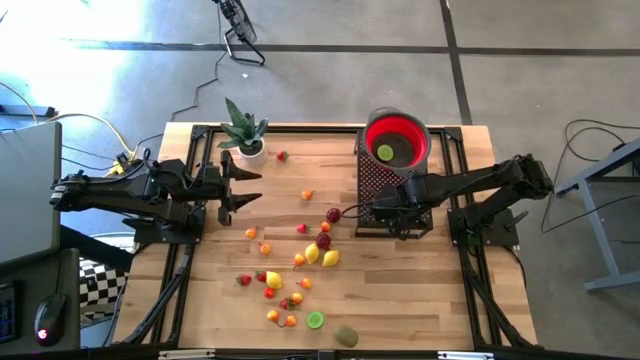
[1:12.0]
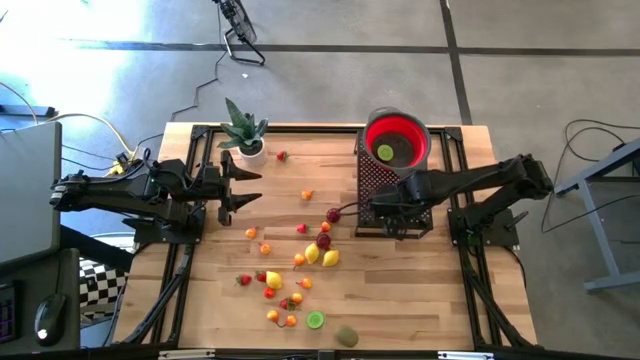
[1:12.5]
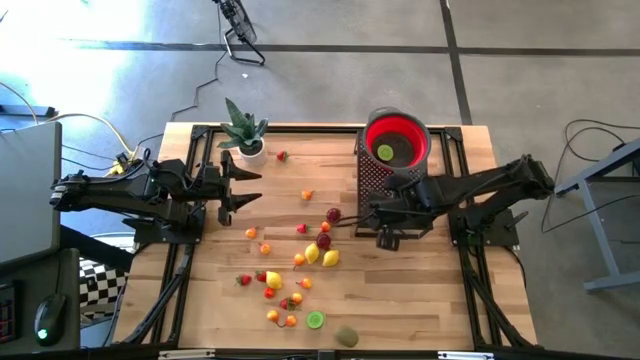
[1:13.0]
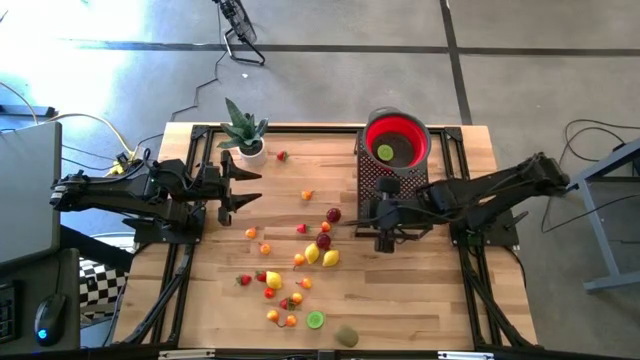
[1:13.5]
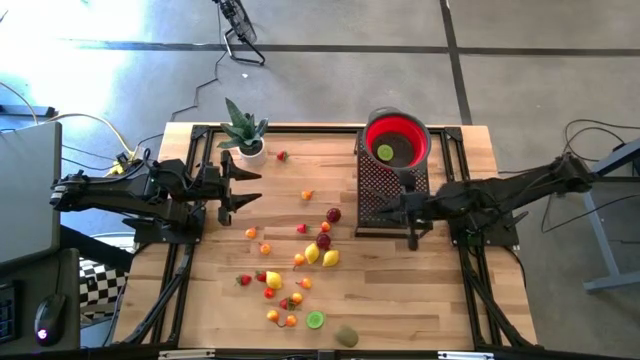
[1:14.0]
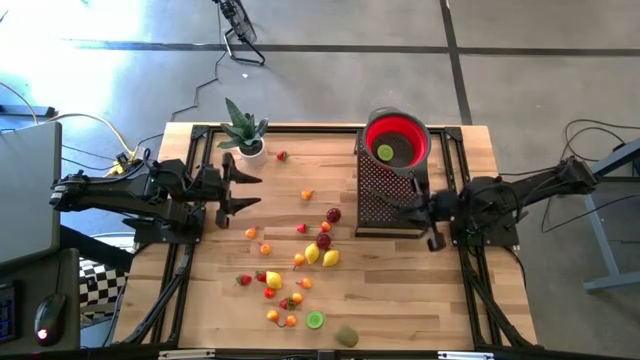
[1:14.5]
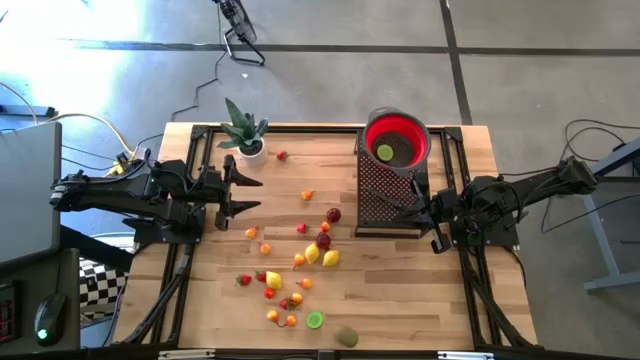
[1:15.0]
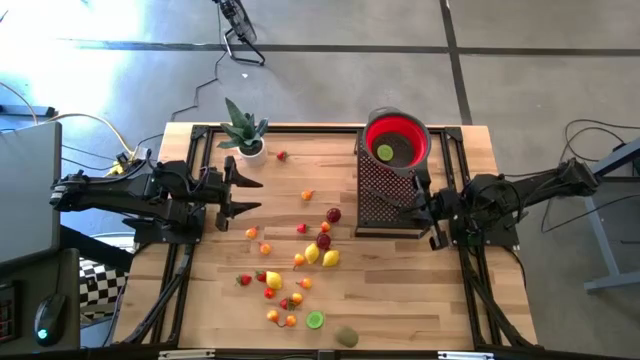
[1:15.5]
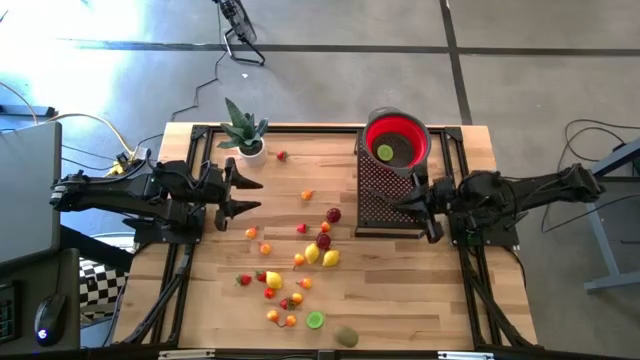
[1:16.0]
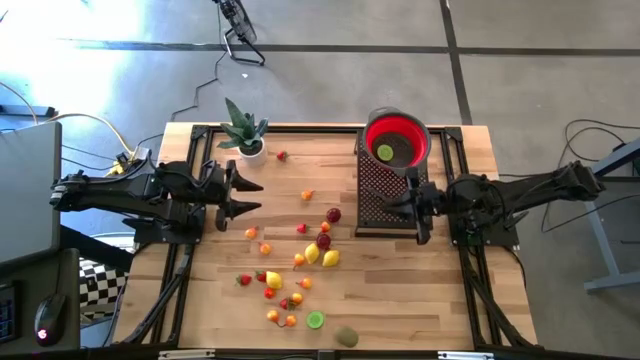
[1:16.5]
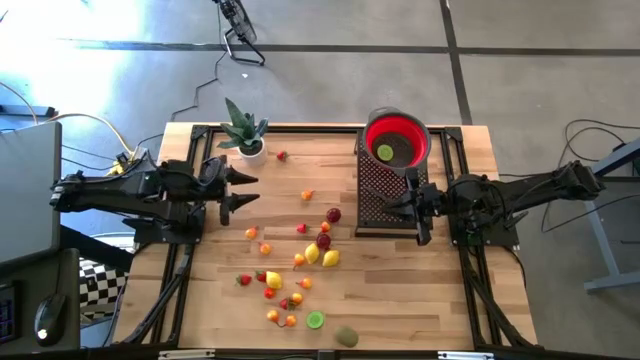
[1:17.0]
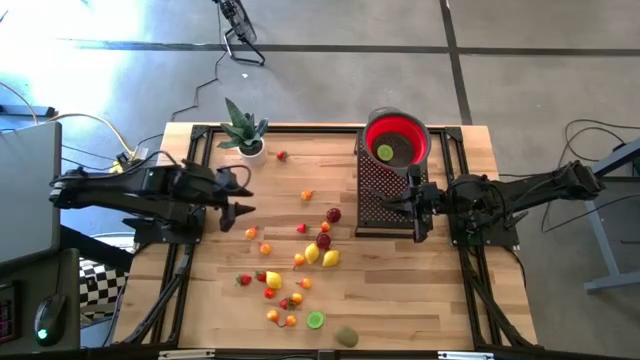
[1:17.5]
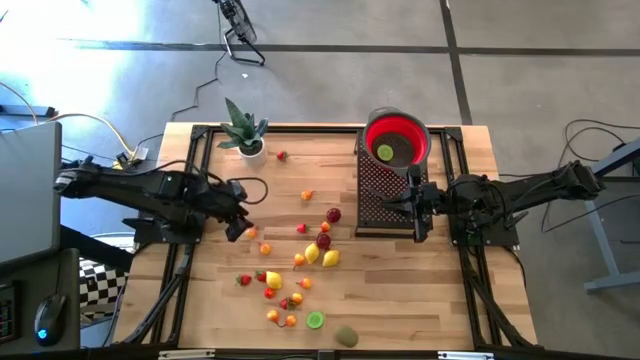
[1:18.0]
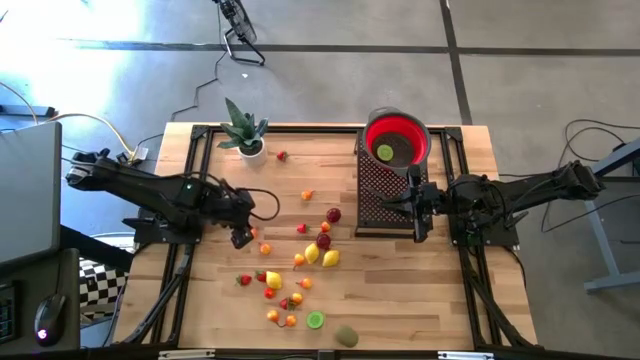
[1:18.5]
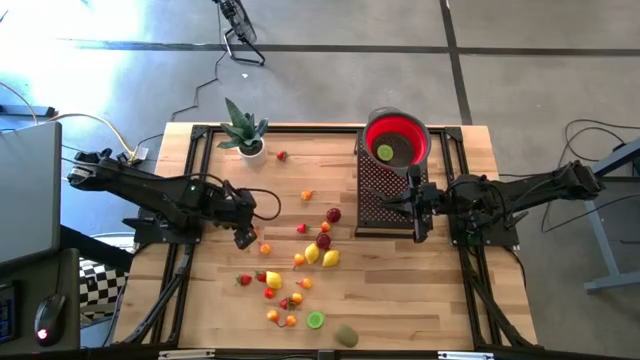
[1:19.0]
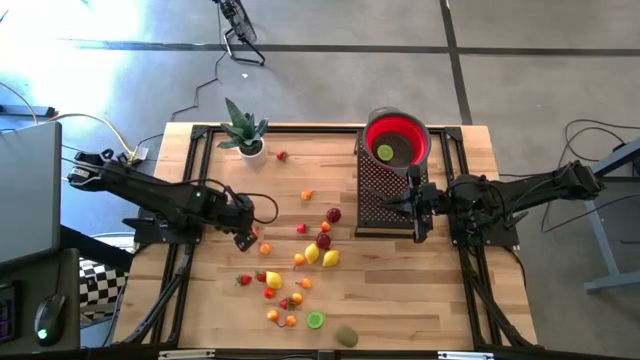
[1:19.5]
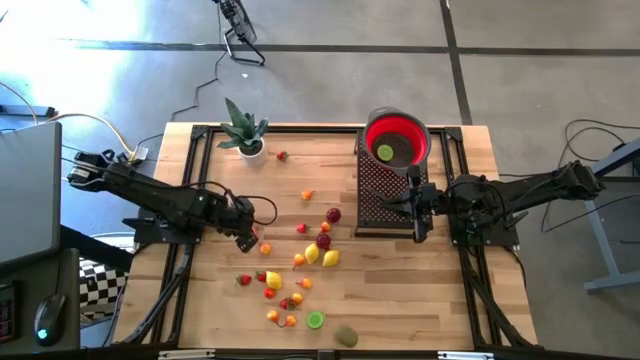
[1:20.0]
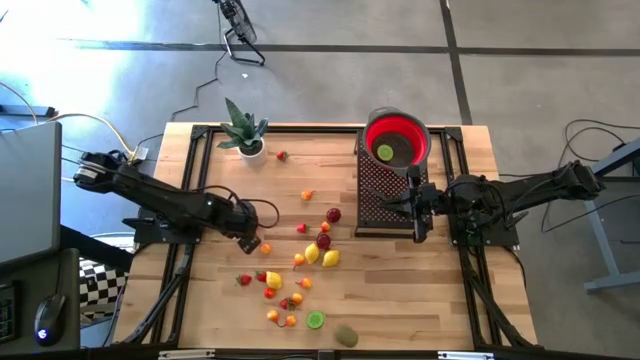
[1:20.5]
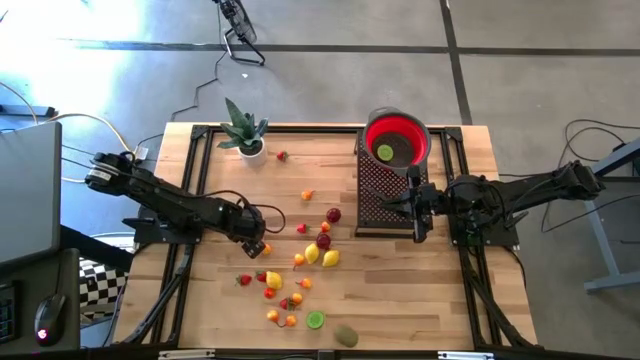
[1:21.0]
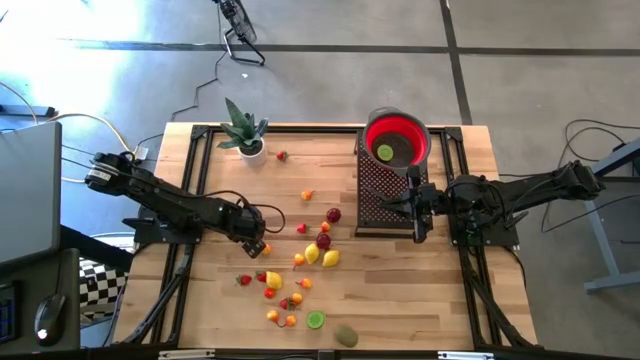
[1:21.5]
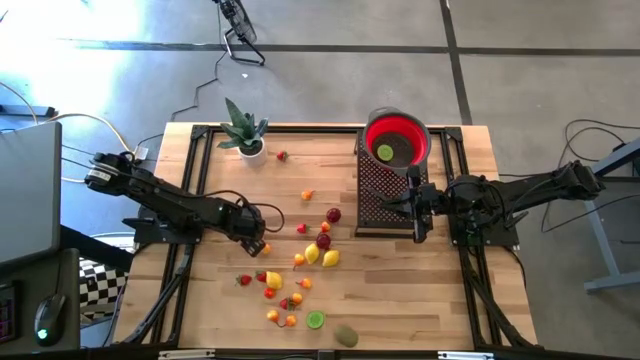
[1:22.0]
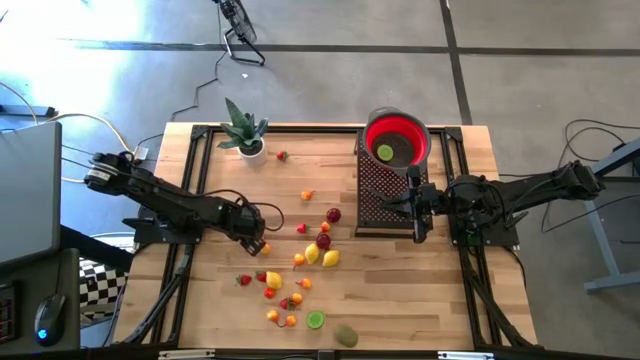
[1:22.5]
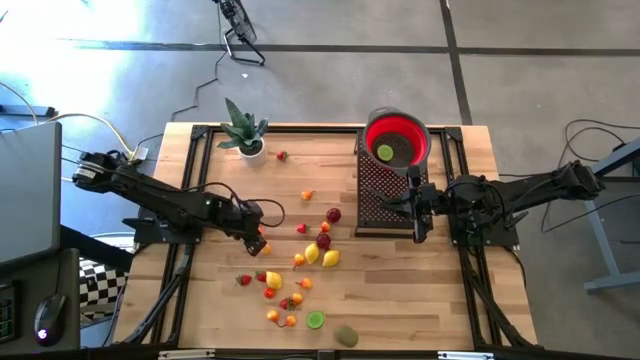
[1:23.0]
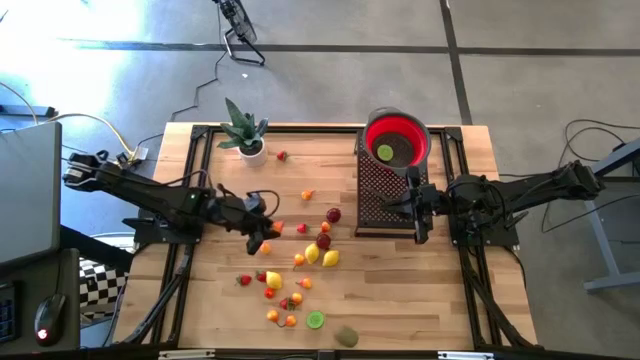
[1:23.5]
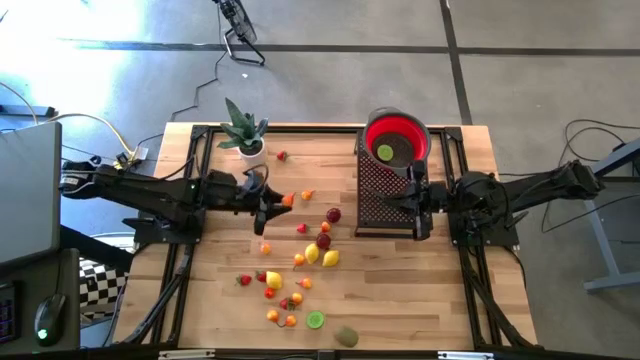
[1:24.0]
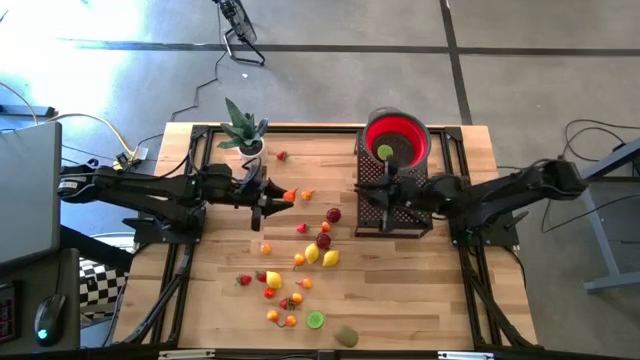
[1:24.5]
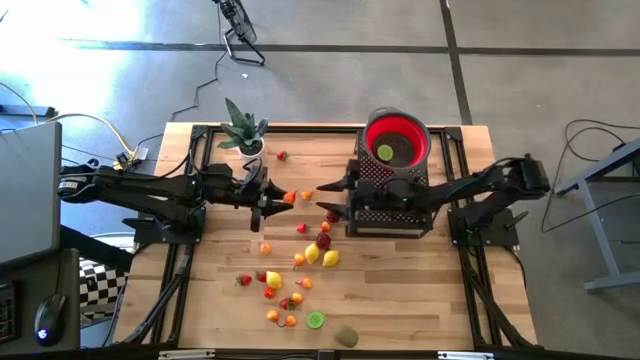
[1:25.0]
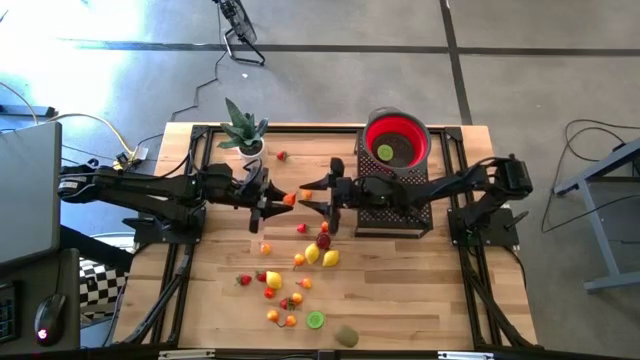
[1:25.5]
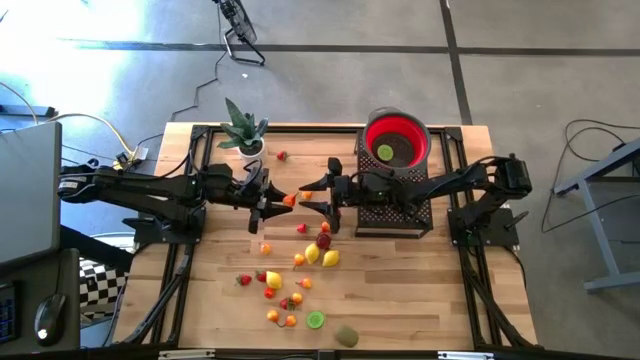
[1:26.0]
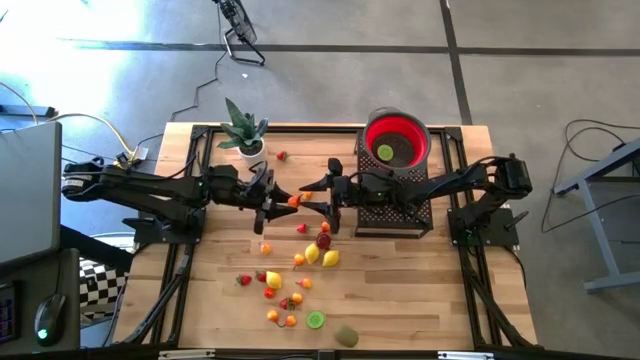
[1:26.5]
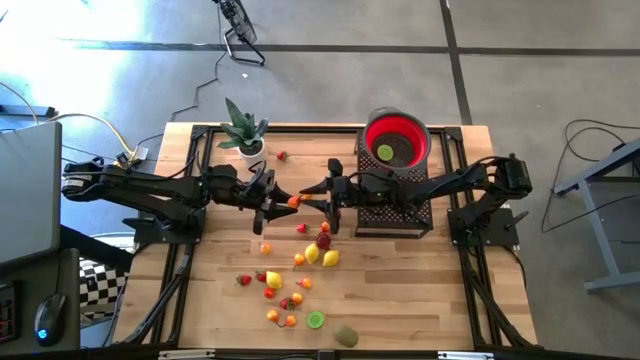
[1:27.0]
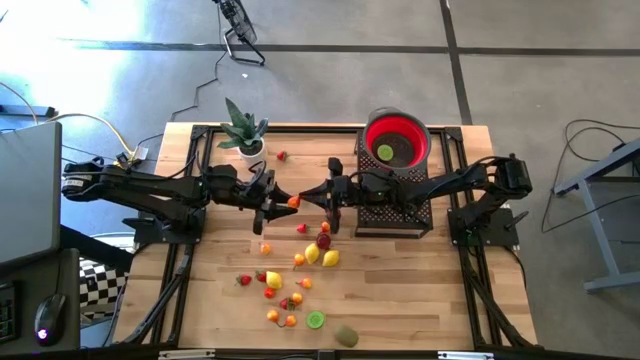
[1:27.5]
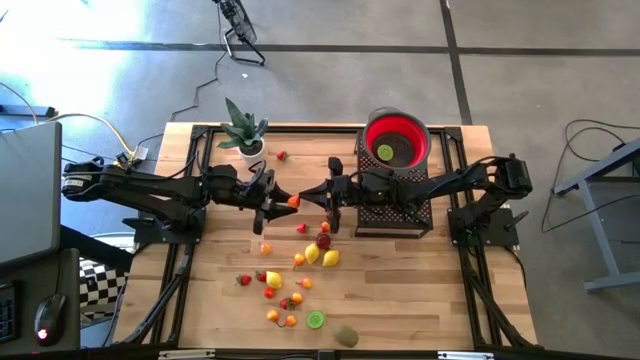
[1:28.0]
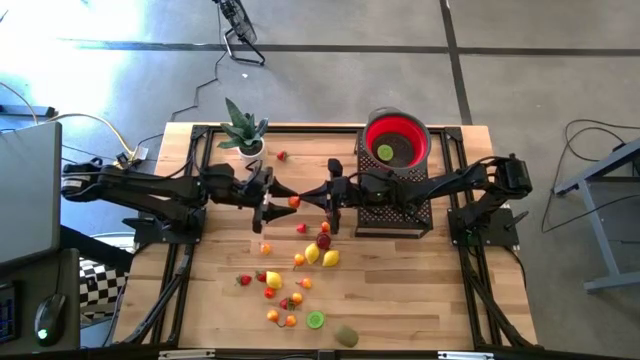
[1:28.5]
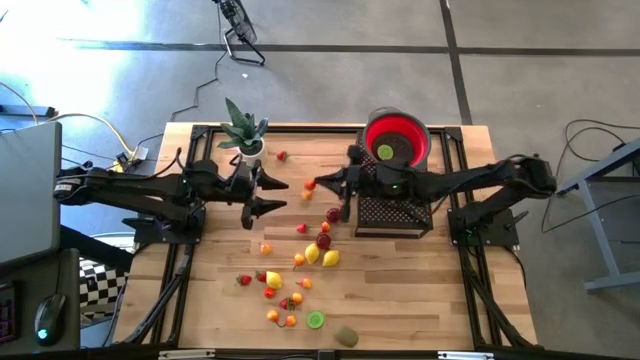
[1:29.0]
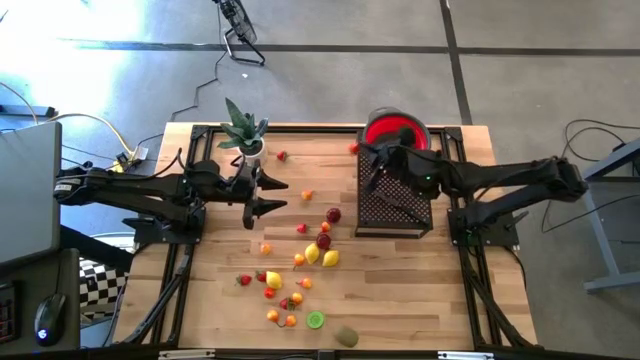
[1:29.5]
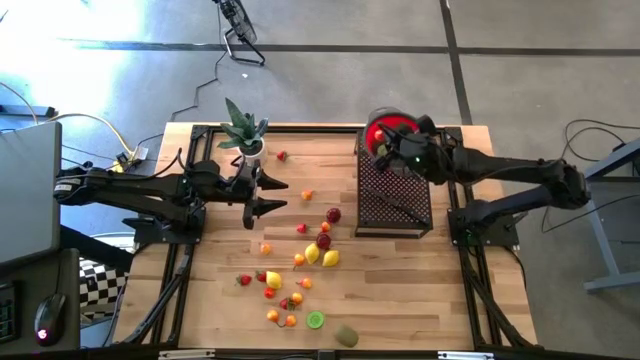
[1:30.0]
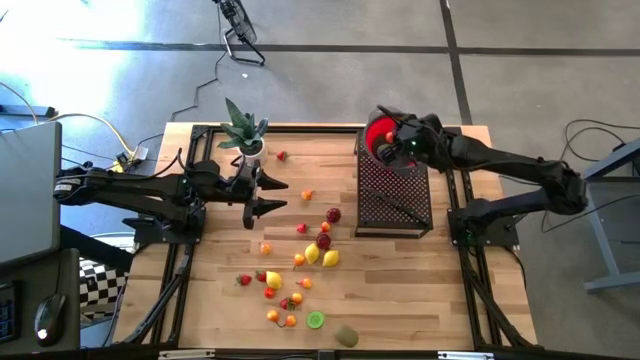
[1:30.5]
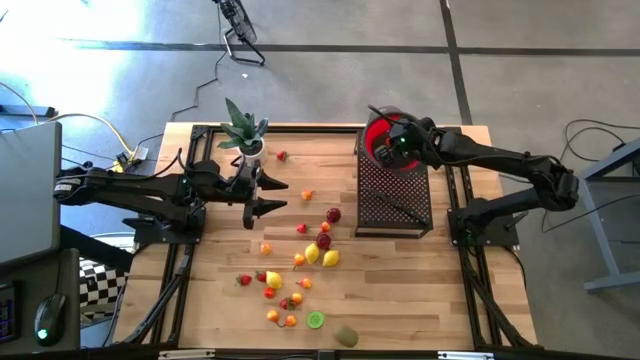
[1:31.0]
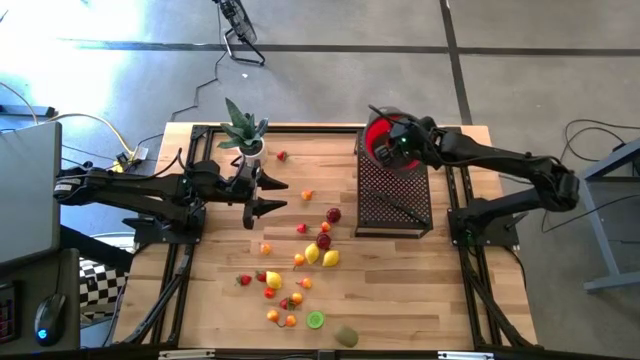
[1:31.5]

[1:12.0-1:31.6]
Task: Pick & Place Fruit
Put the pear into the strainer bowl on the shelf

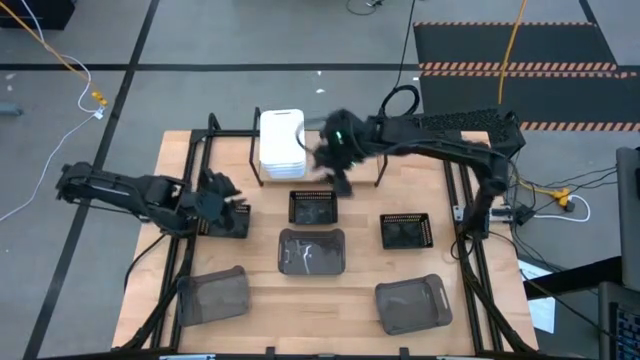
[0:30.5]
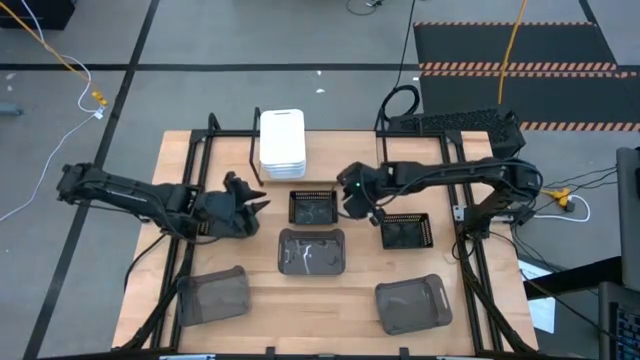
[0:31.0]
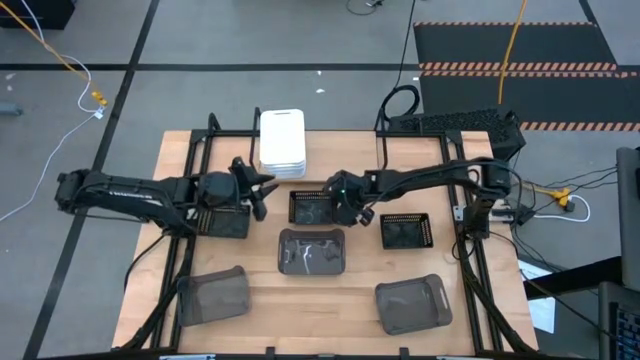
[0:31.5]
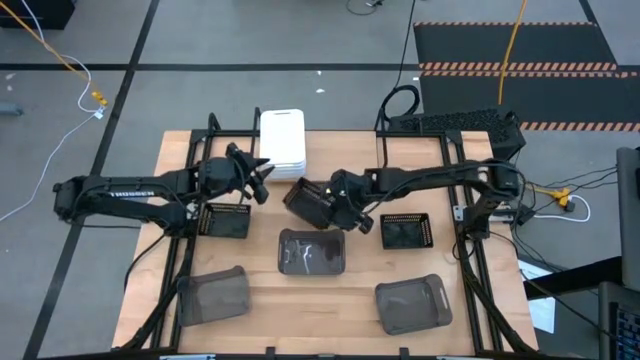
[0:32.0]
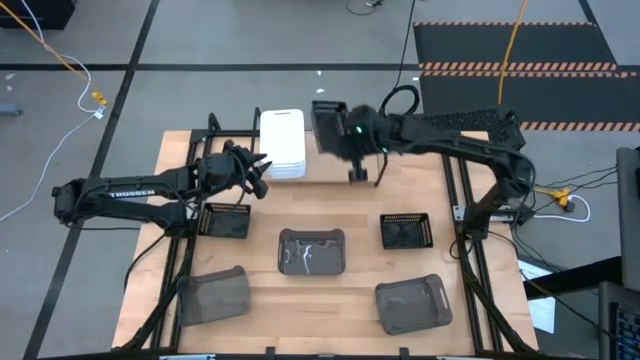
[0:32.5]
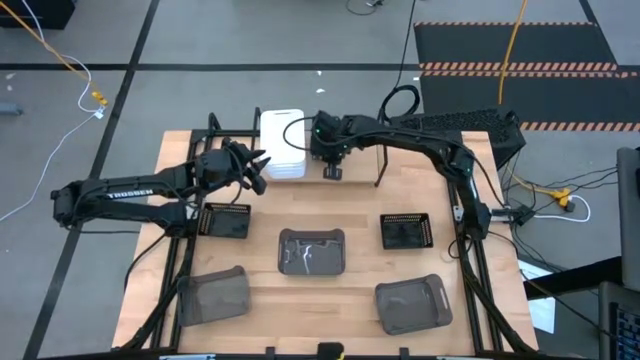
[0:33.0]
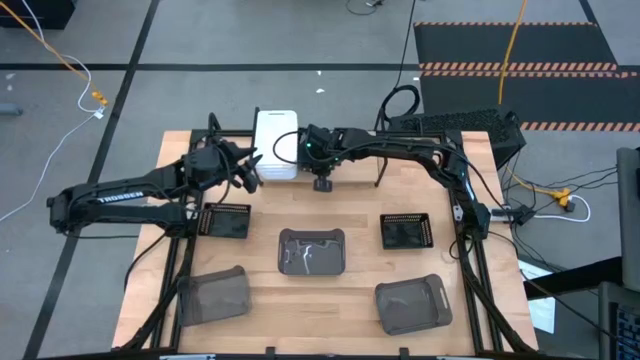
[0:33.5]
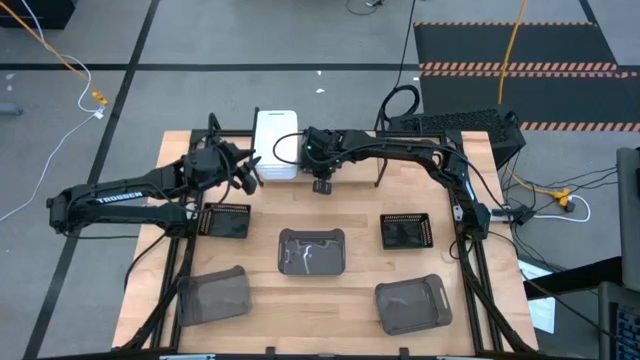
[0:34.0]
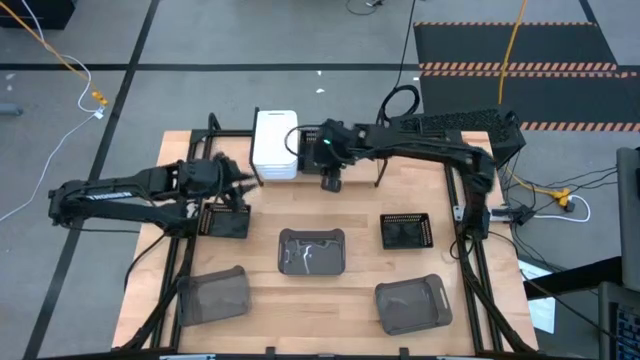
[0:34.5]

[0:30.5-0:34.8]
Task: Stack baskets on shelf by color
Put the center black bin on the shelf
